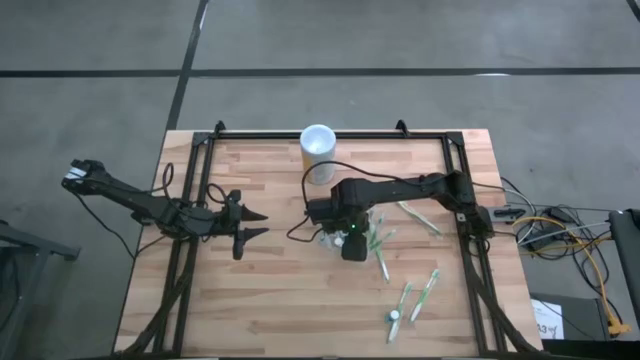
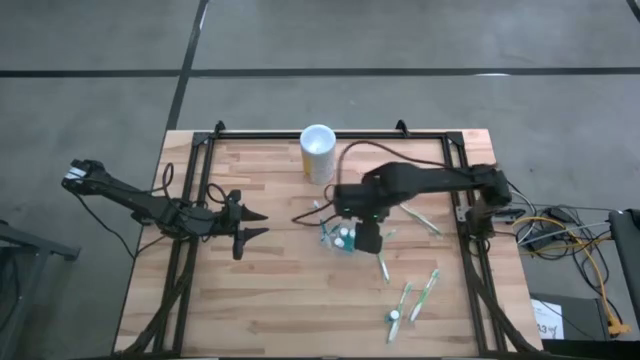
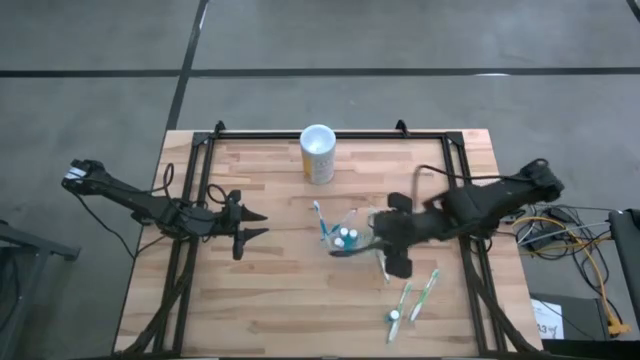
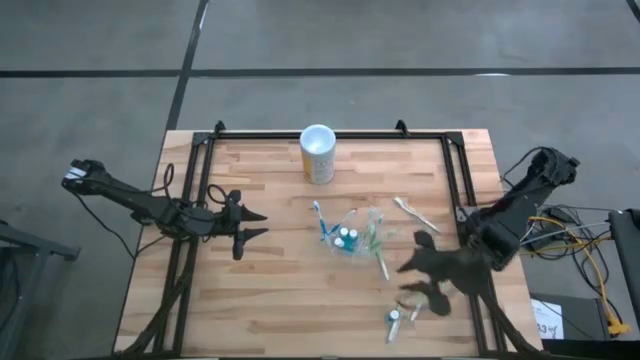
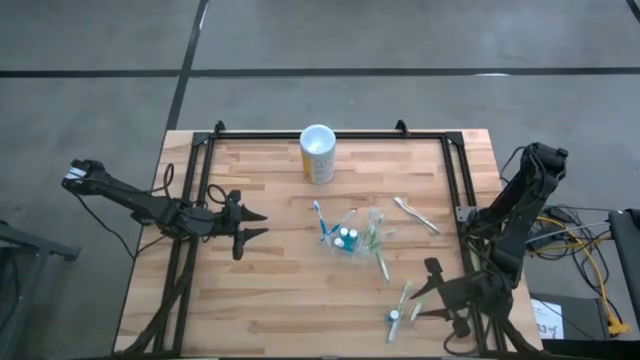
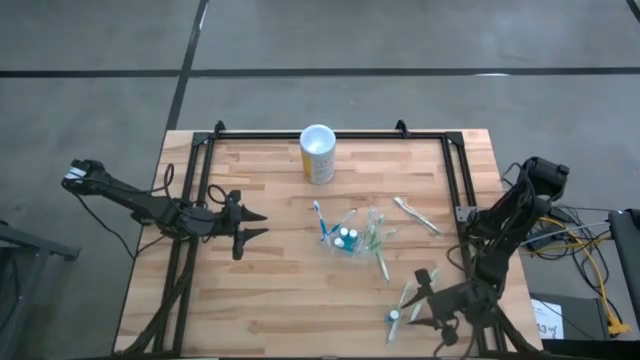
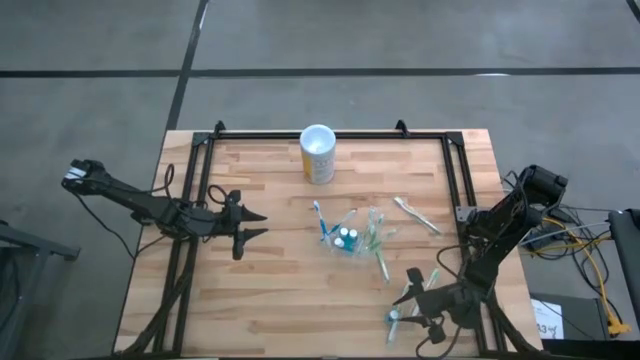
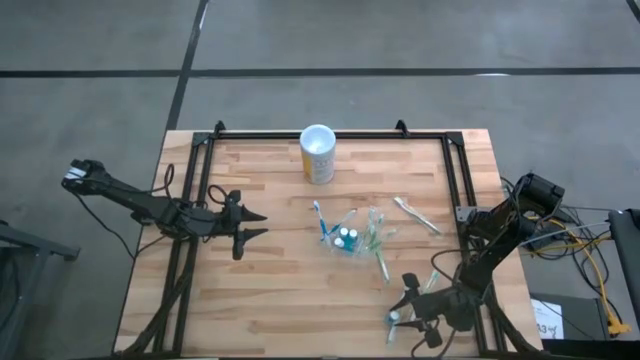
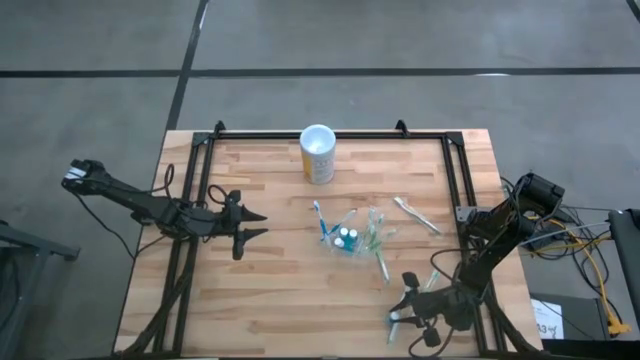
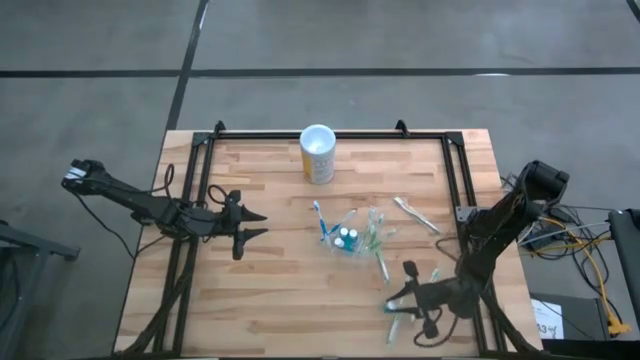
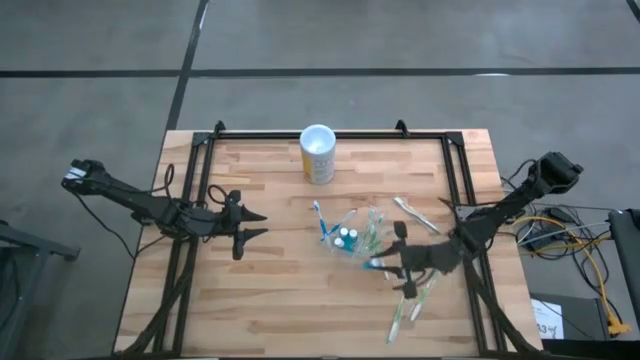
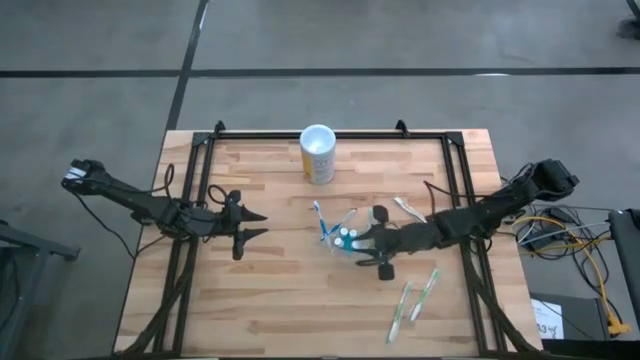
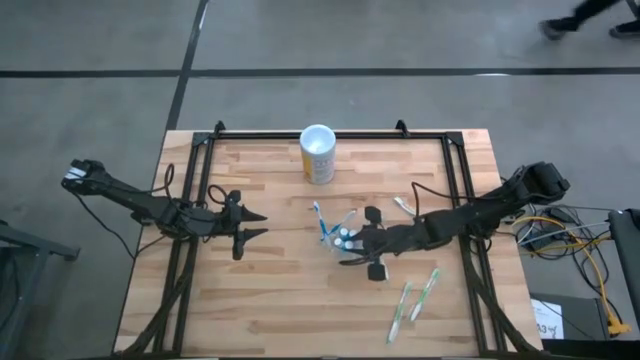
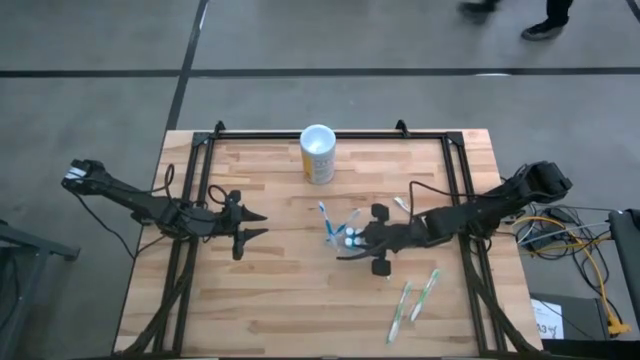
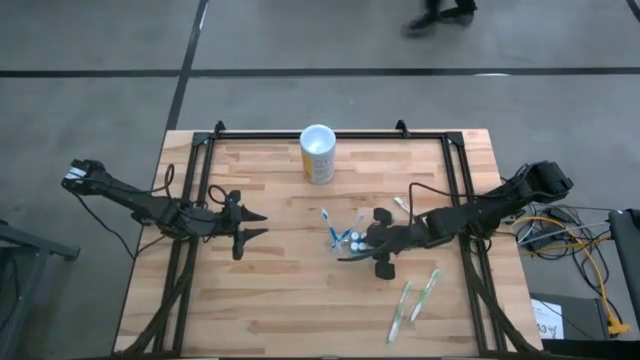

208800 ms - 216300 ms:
Task: Pick & Place toothbrushing station
Put the blue mouthwash into the middle section of the transparent organizer

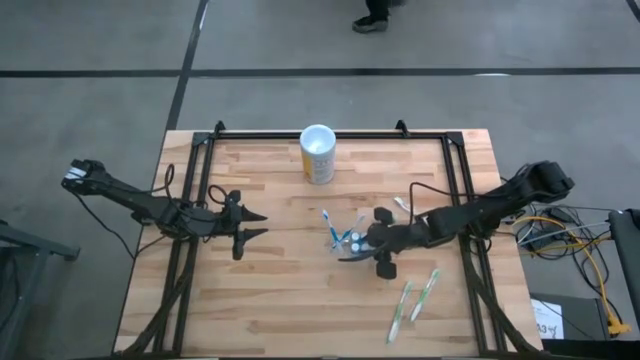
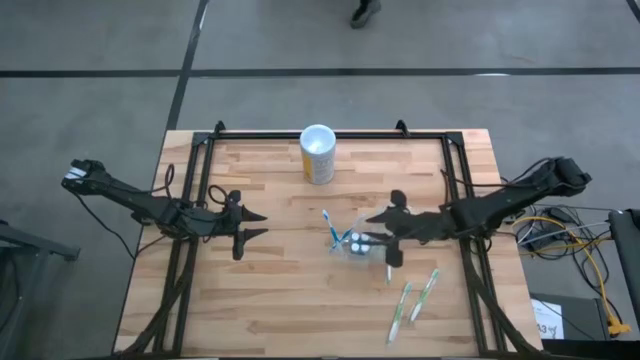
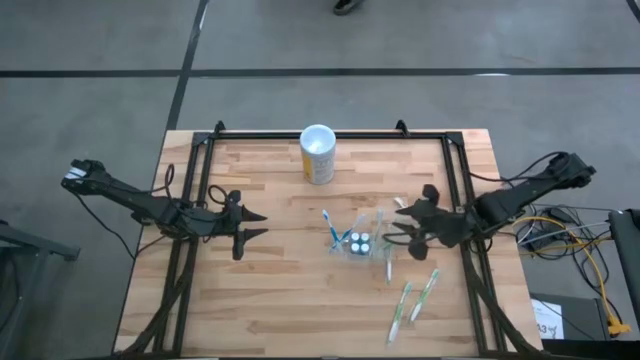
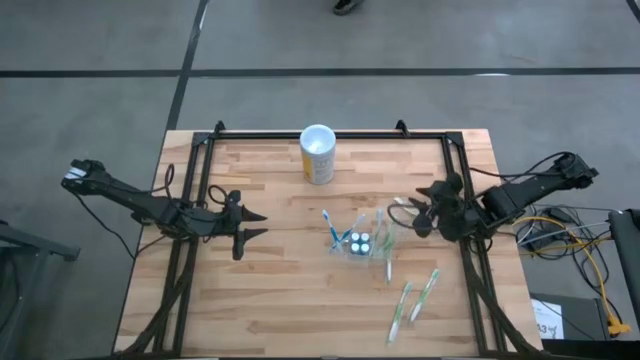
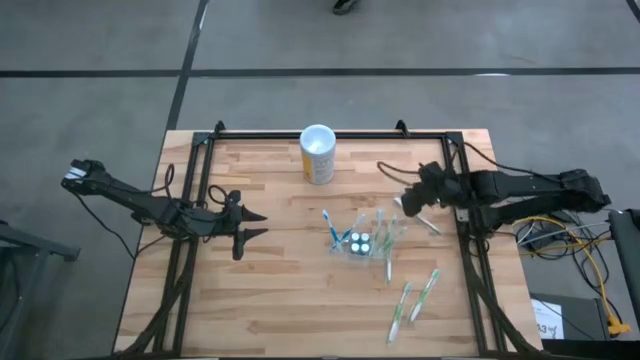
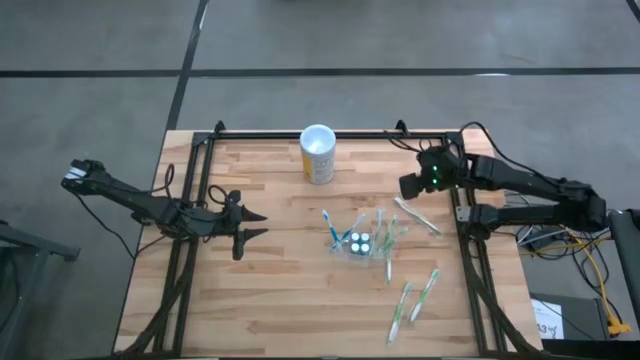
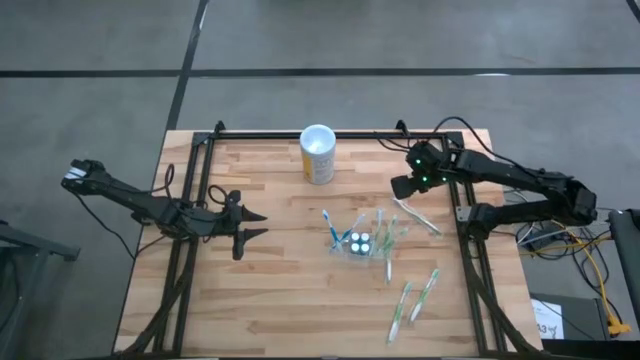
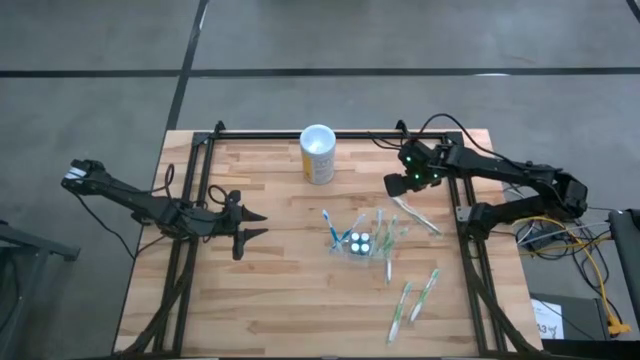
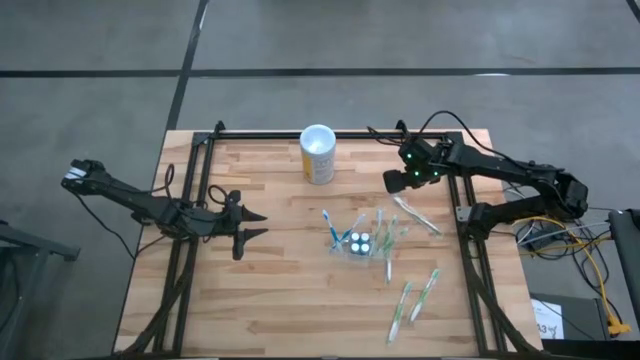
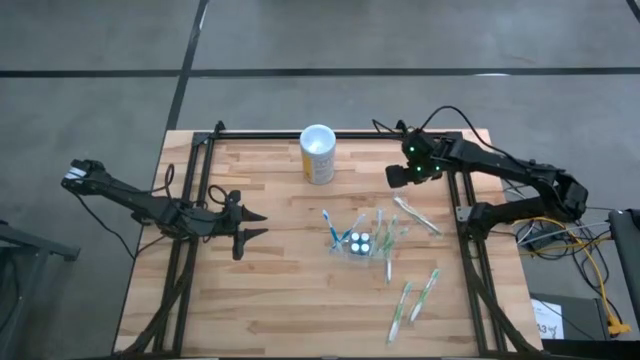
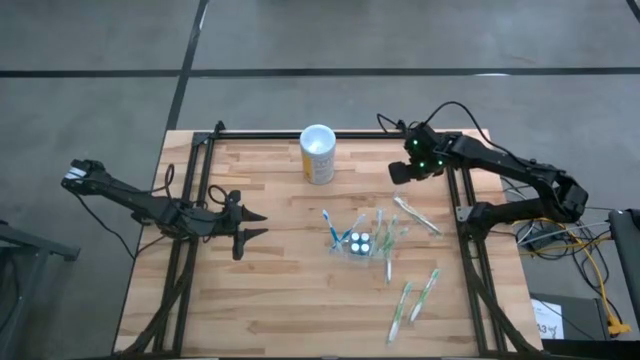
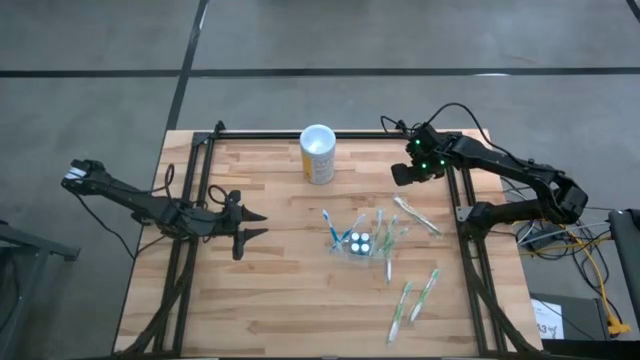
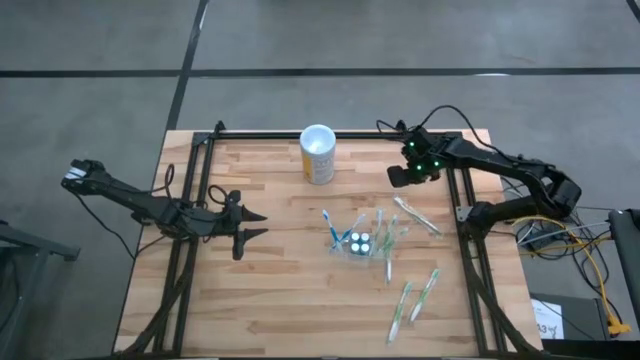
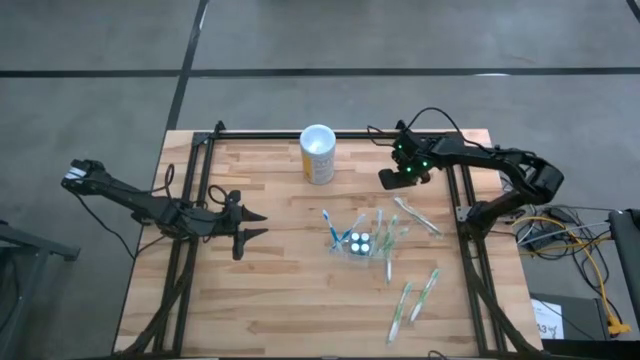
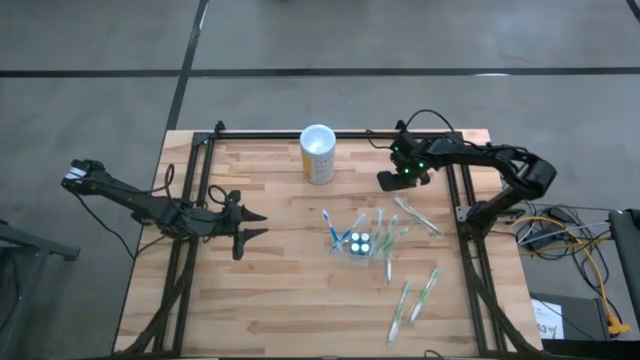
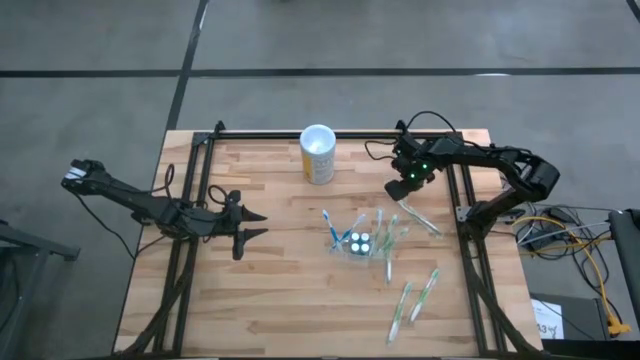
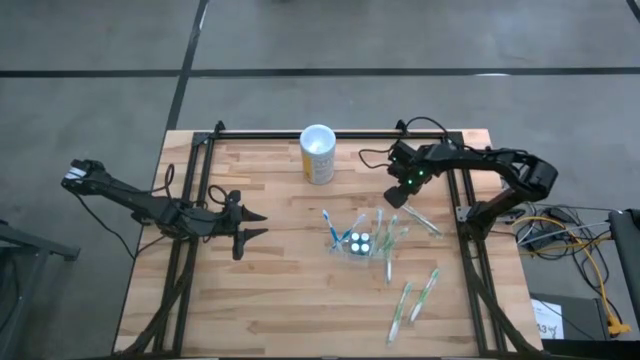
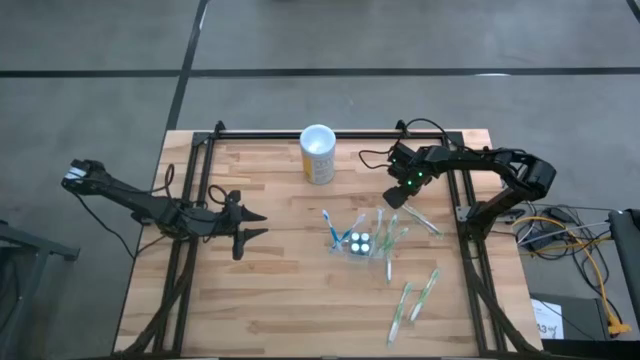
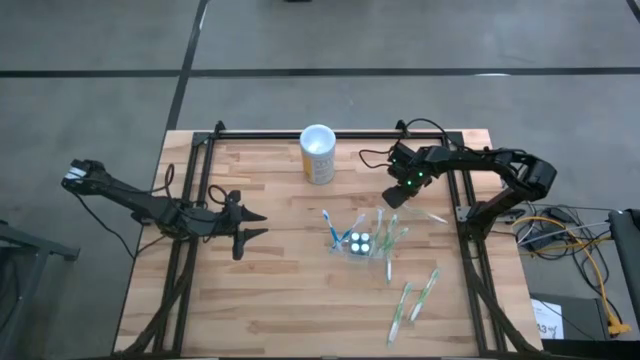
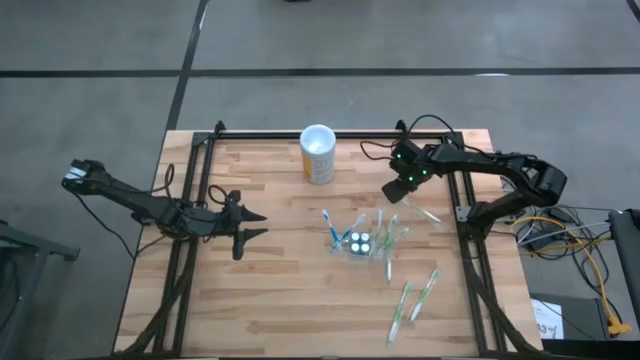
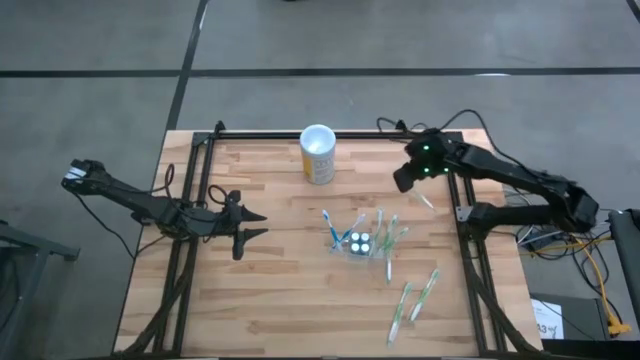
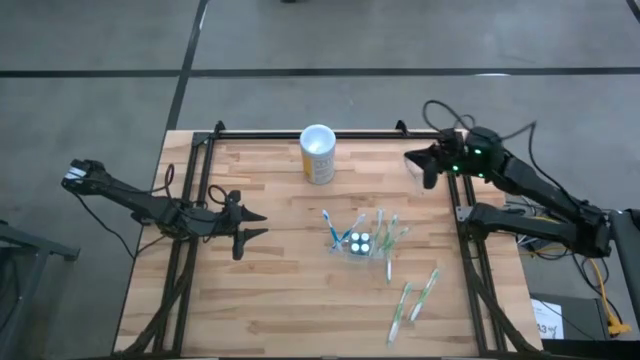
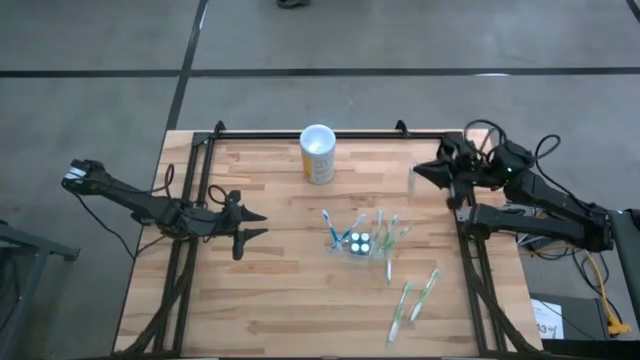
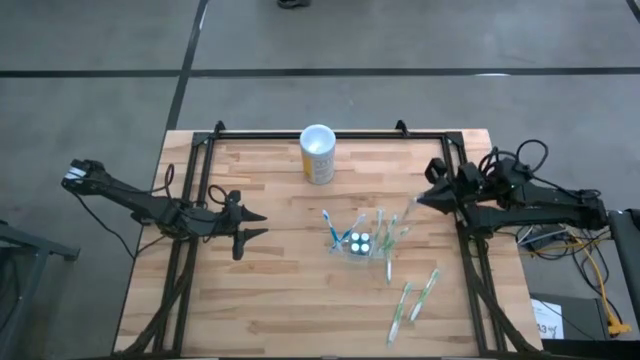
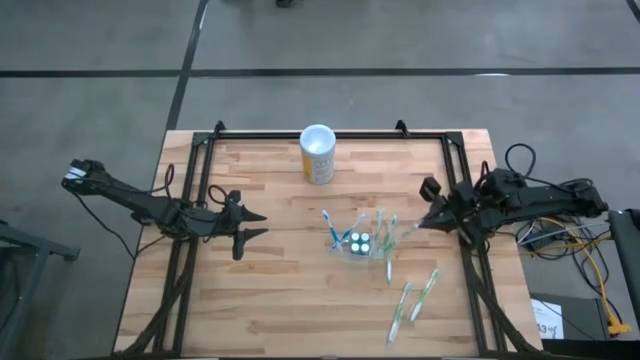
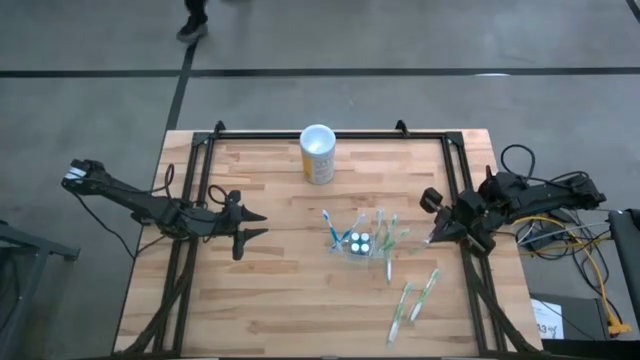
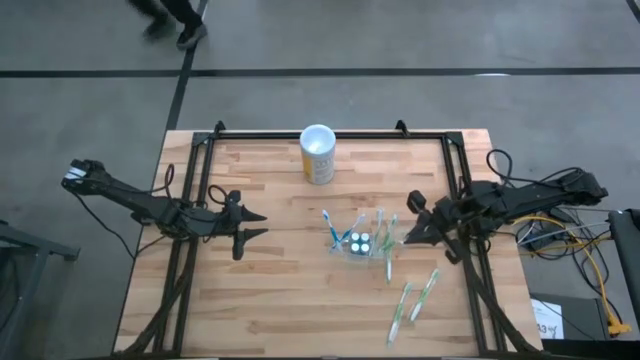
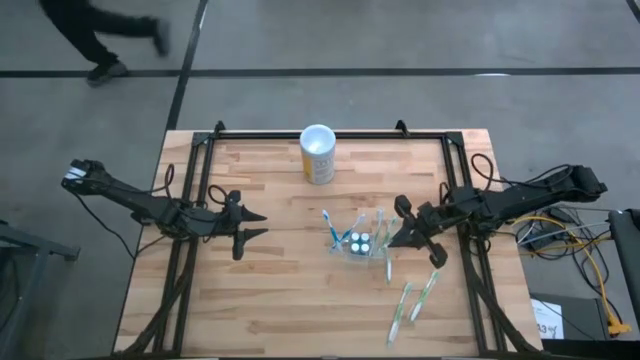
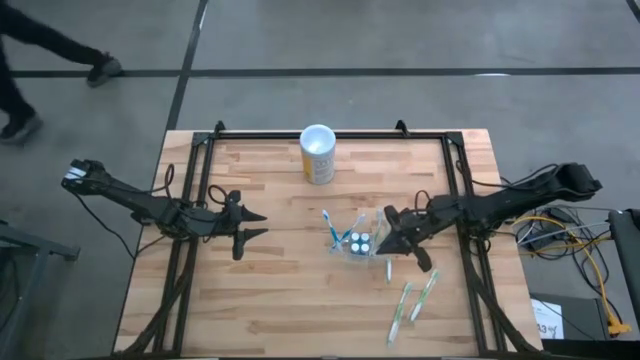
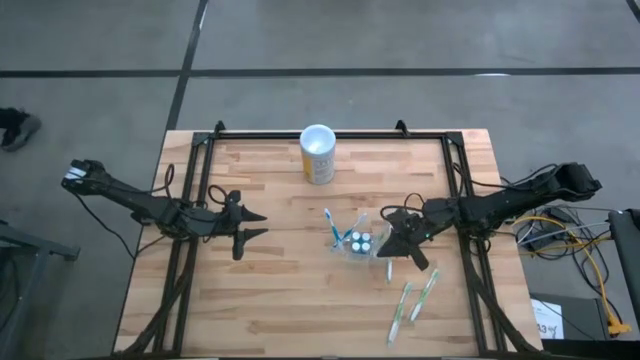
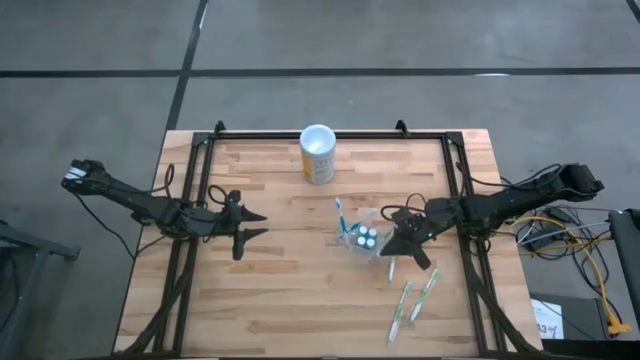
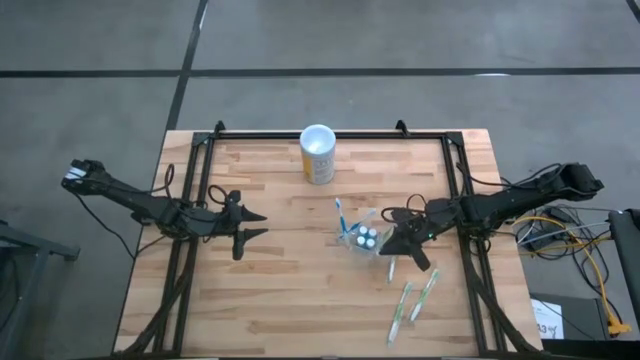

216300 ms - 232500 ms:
Put the green toothbrush into the right section of the transparent organizer
